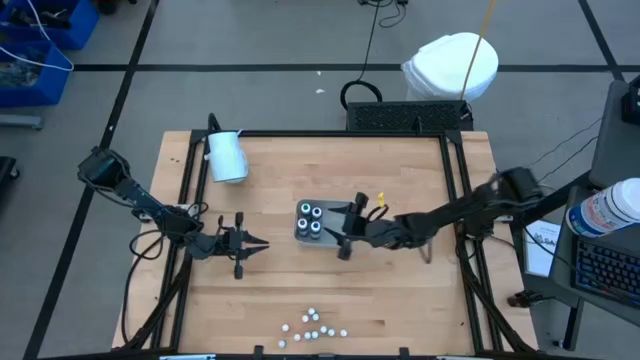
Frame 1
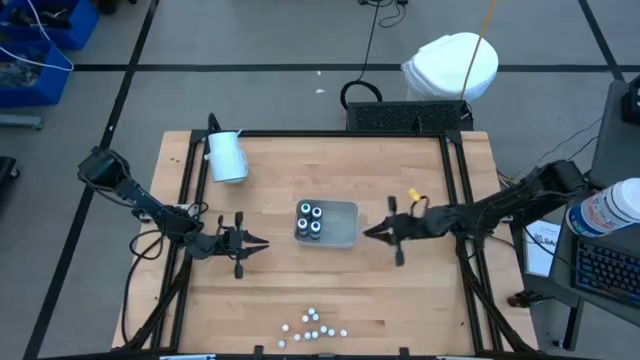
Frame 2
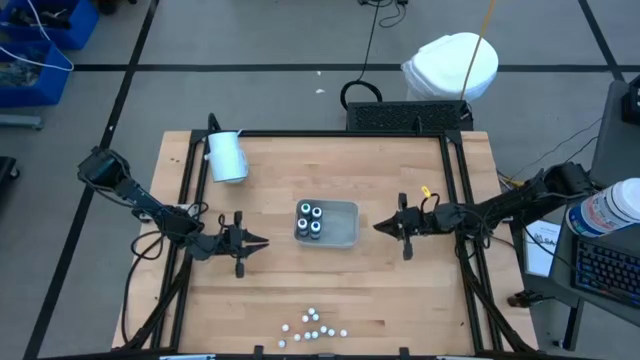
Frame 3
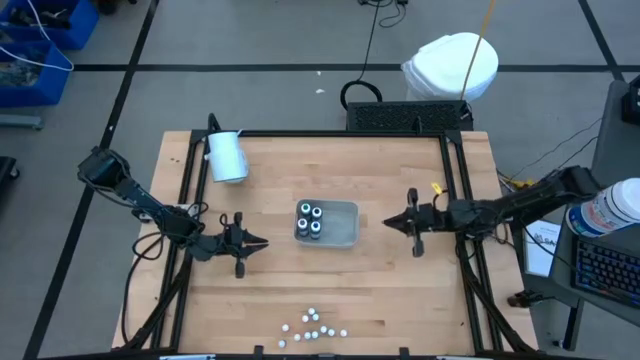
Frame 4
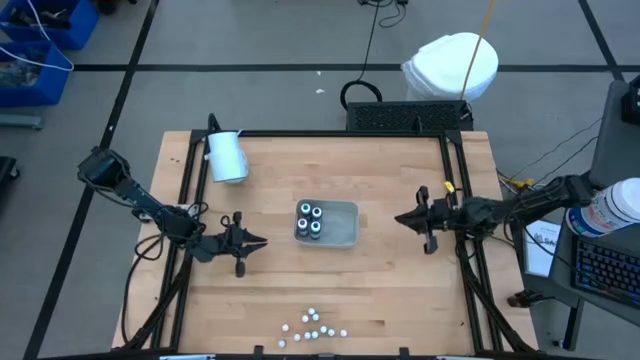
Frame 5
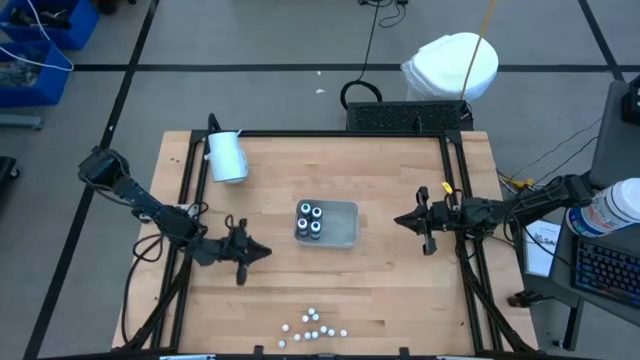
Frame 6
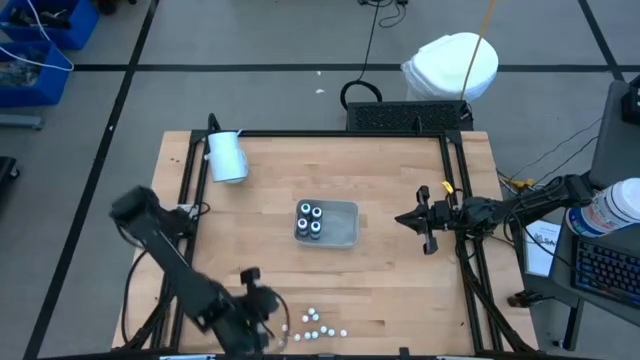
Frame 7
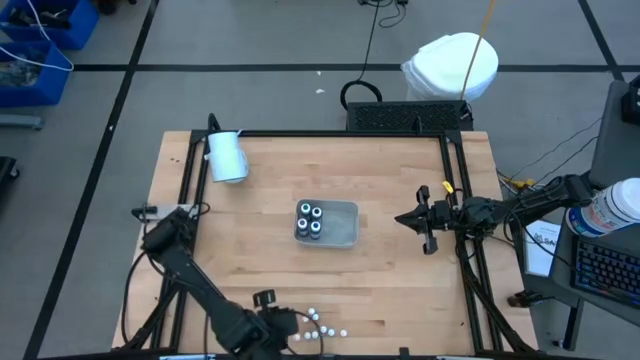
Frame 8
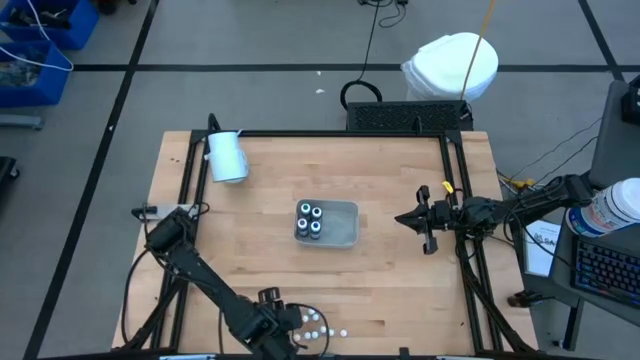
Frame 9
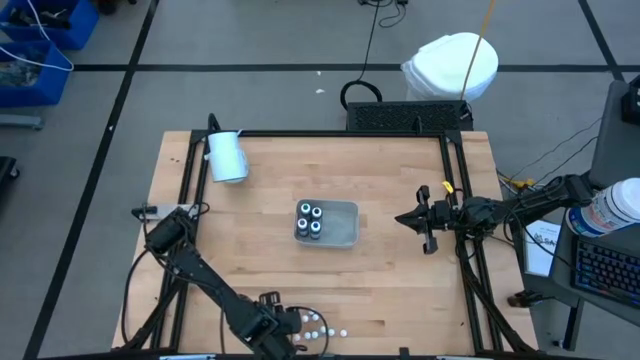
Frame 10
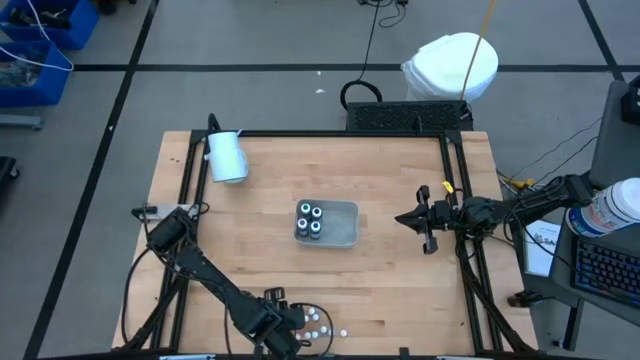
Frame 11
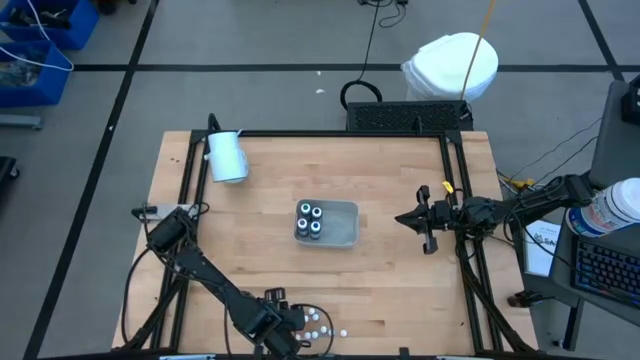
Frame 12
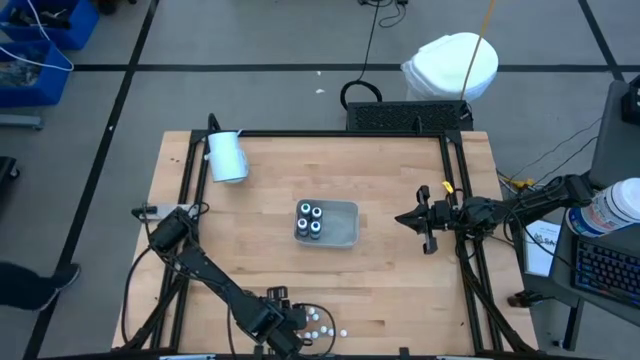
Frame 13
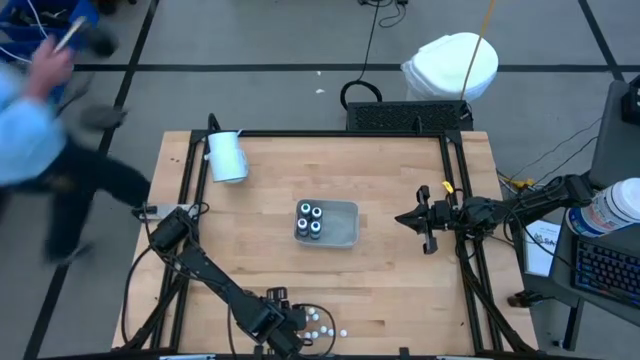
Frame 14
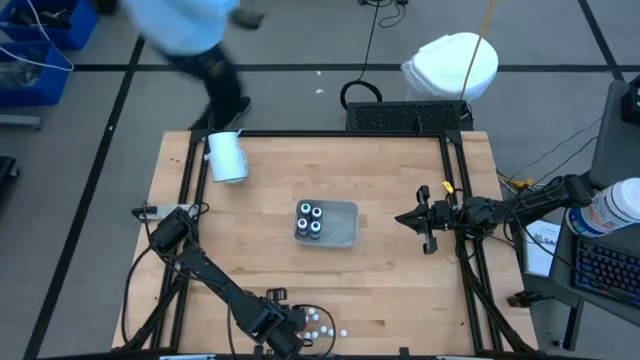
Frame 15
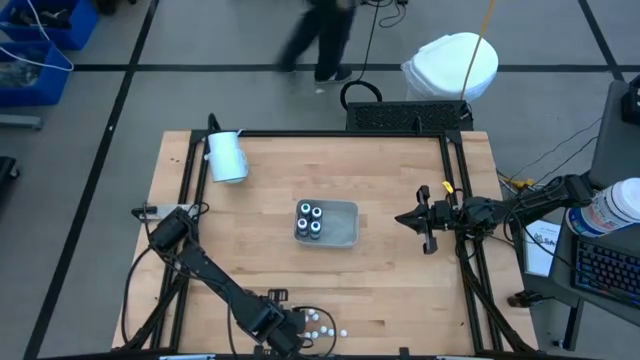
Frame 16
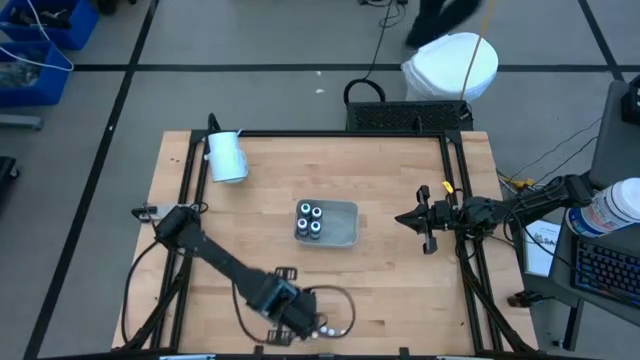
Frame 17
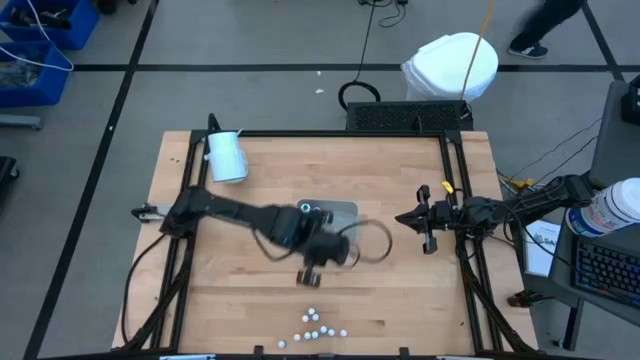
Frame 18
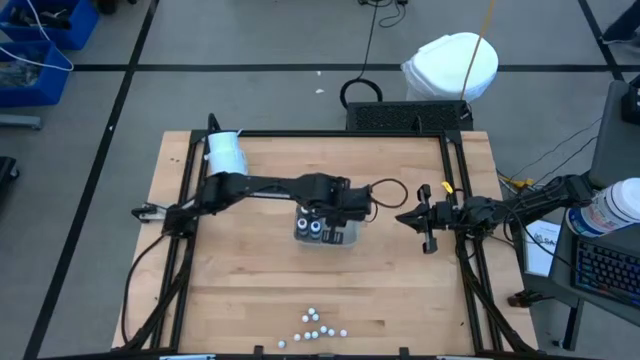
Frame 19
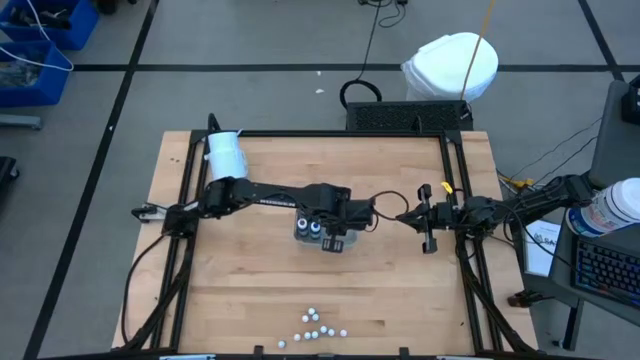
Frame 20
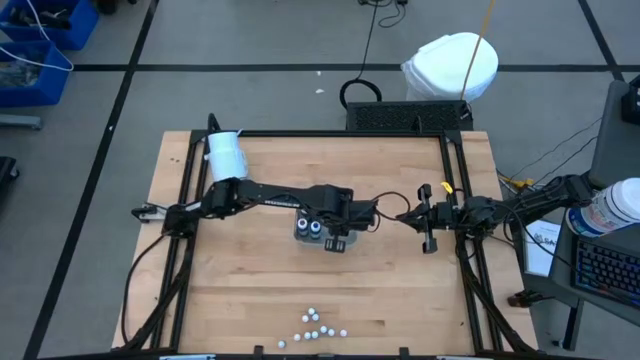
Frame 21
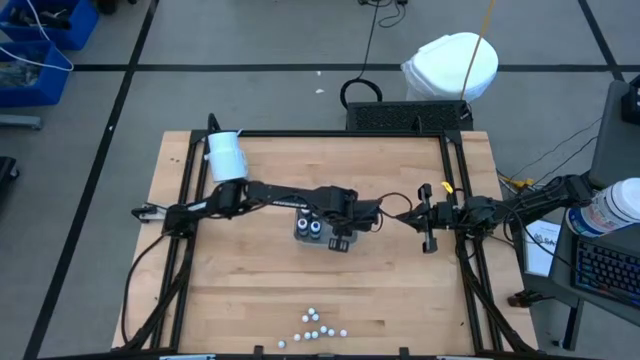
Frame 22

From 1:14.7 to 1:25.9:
Task: Pick & Place food coloring
Put the small orange food coloring bottle into the gray bin

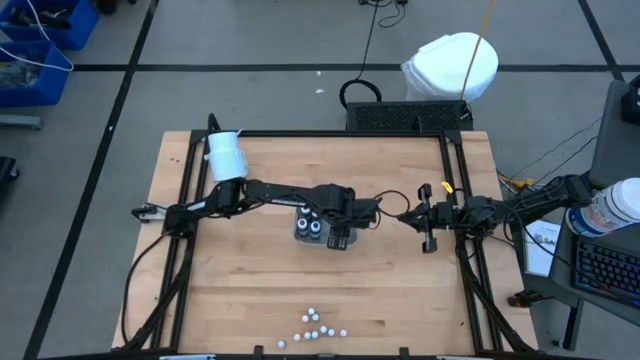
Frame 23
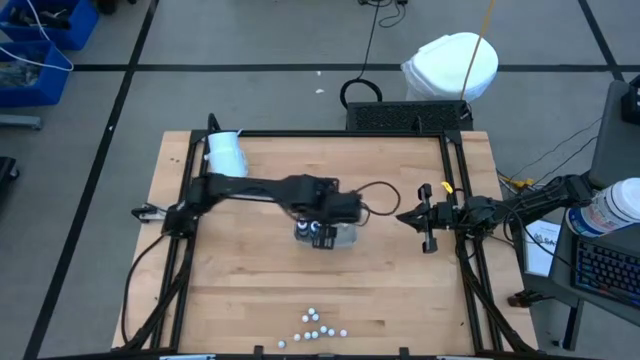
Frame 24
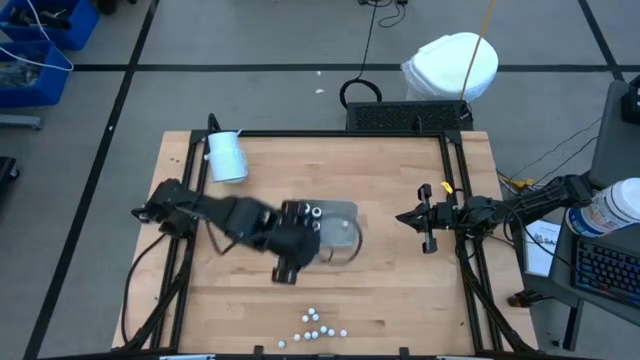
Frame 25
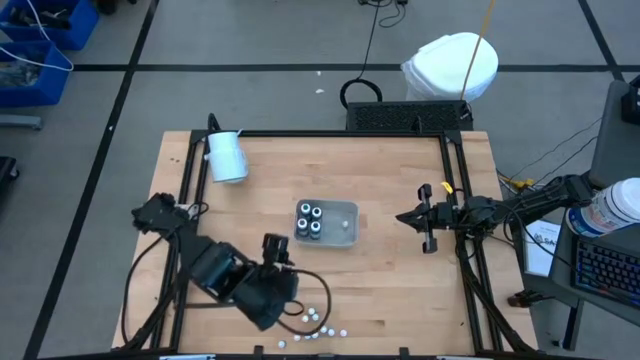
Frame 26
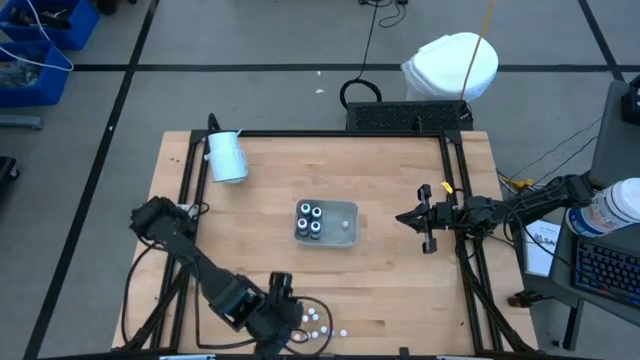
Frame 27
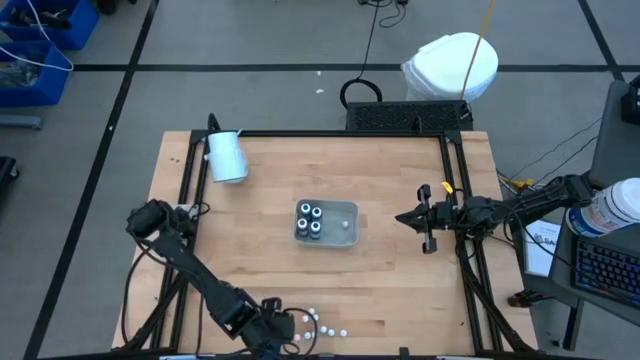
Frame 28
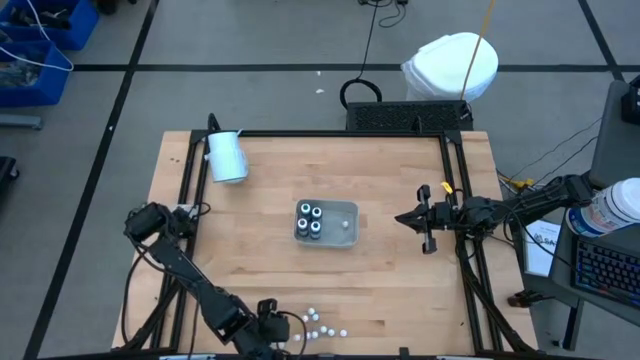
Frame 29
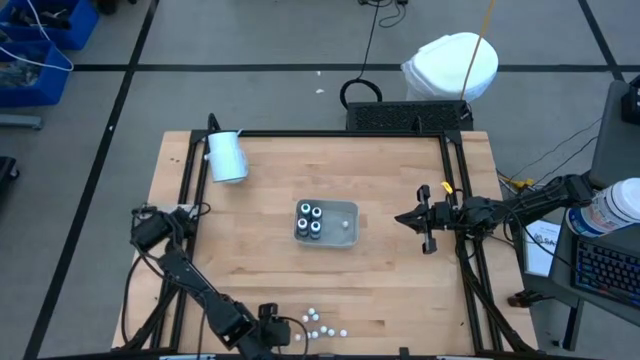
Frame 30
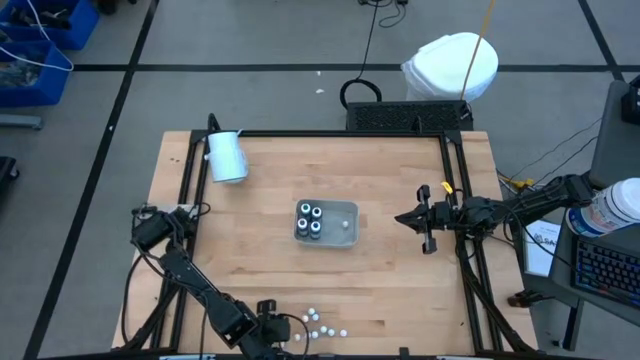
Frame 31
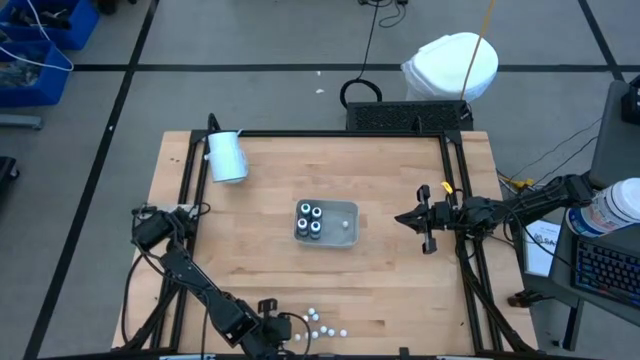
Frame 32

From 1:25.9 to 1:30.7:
Put the small green food coloring bottle into the gray bin

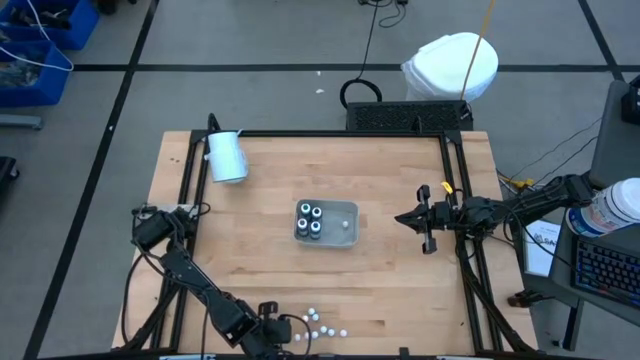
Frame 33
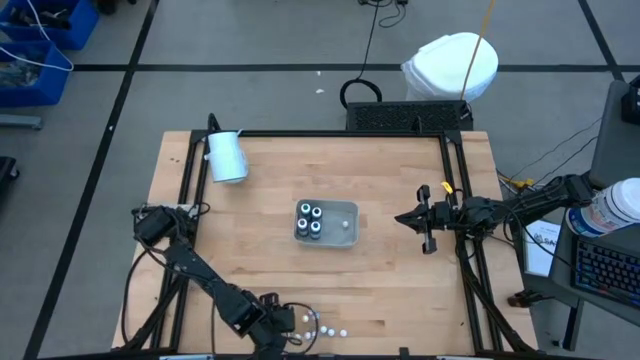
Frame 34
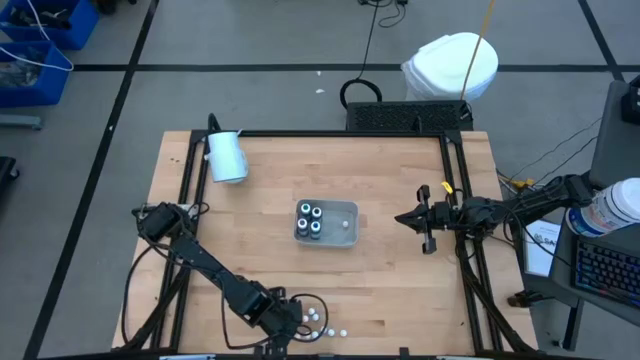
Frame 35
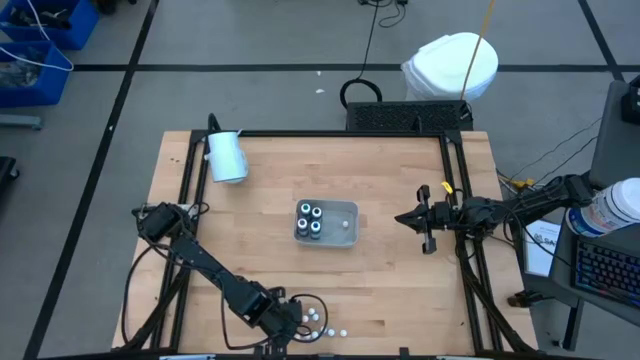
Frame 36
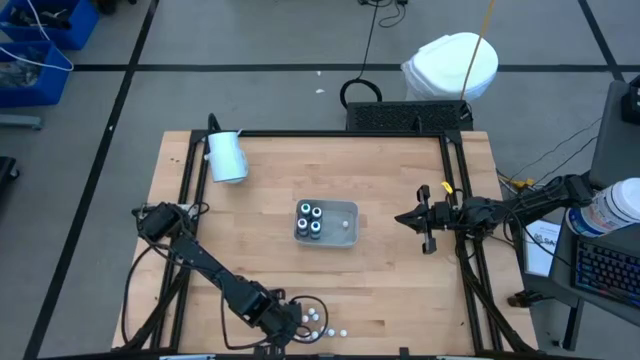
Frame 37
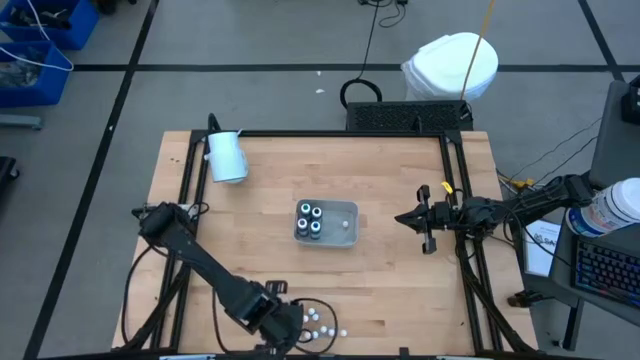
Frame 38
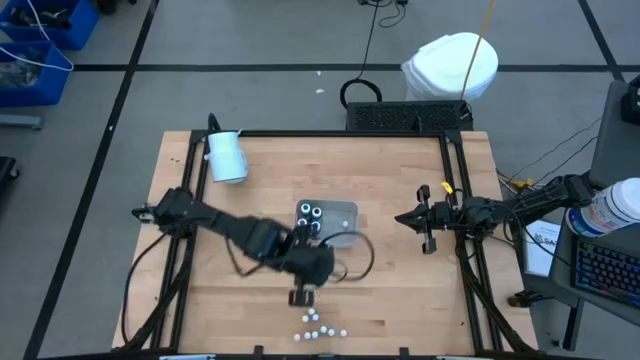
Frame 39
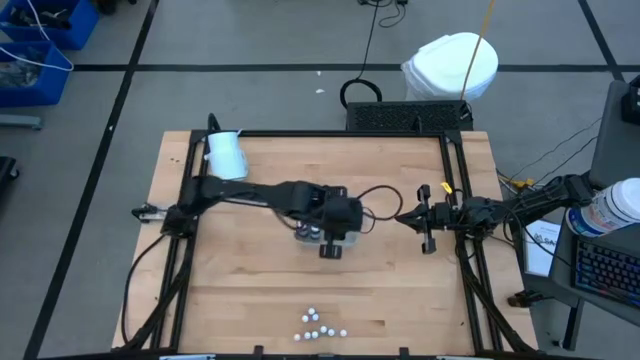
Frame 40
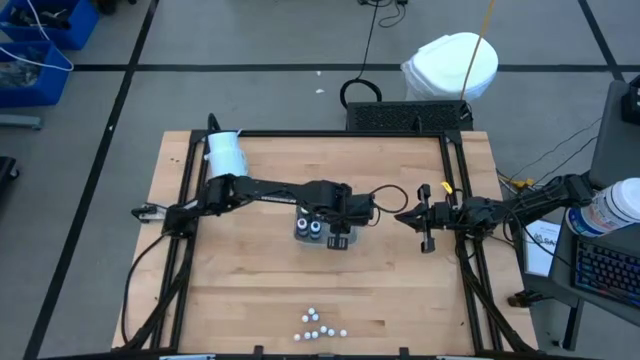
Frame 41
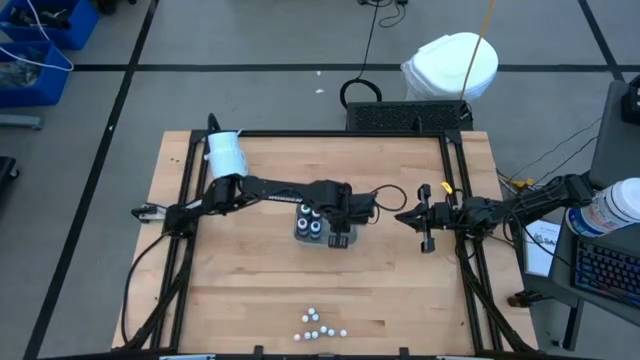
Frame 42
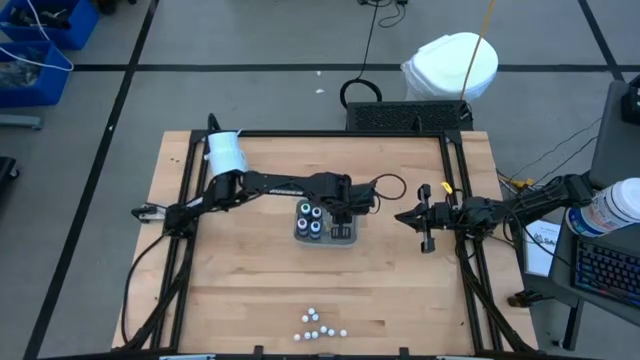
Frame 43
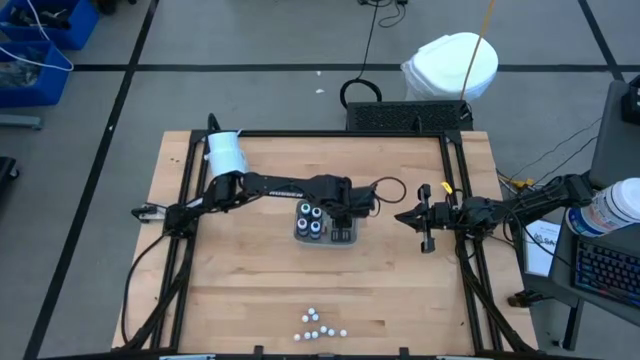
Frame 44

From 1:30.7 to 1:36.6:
Put the small green food coloring bottle into the gray bin
